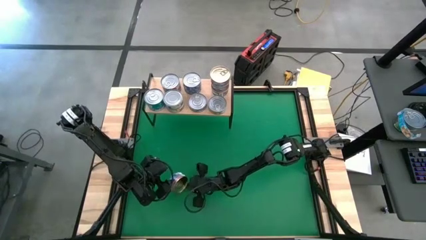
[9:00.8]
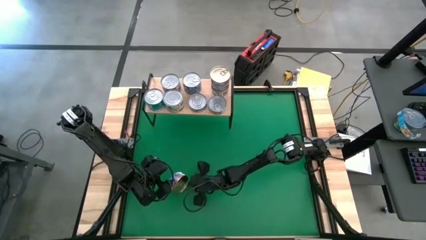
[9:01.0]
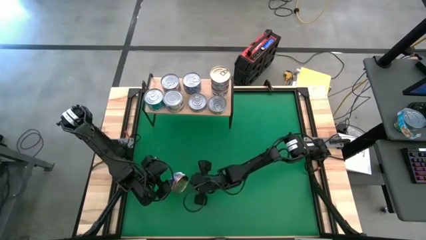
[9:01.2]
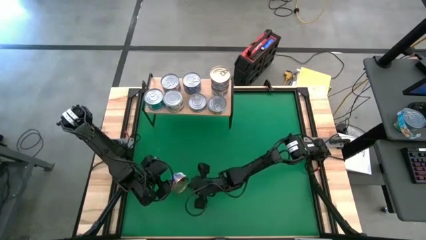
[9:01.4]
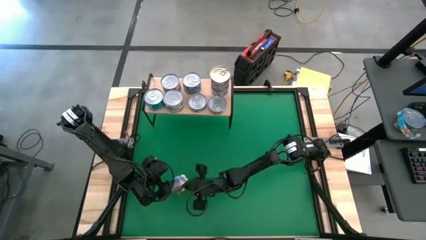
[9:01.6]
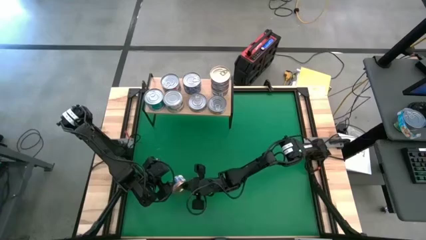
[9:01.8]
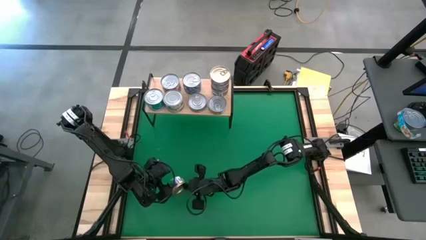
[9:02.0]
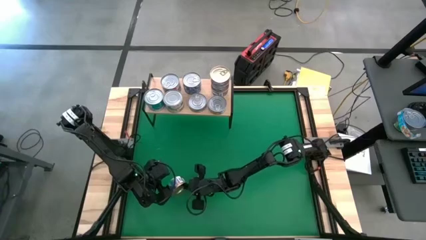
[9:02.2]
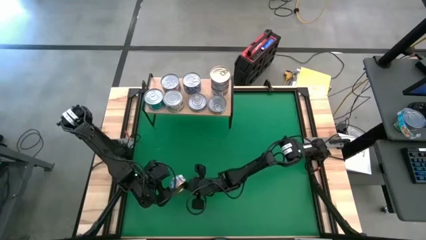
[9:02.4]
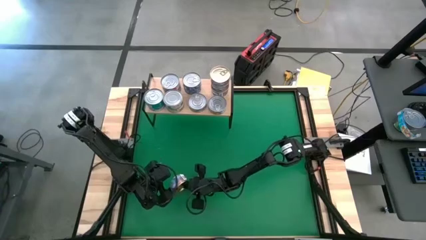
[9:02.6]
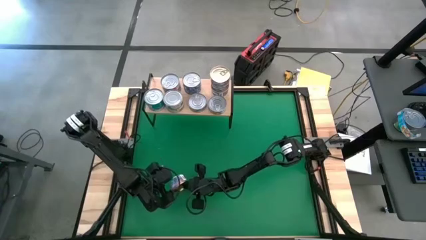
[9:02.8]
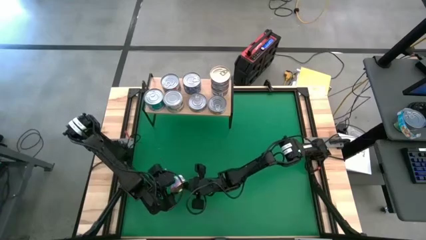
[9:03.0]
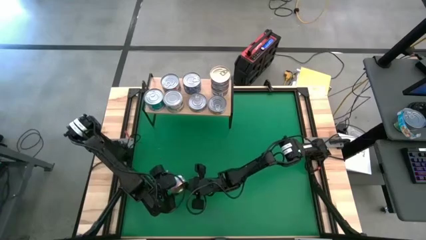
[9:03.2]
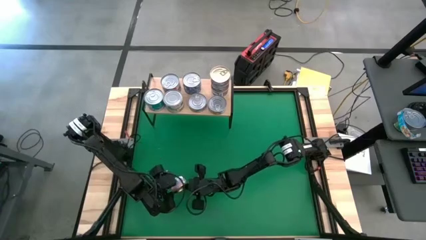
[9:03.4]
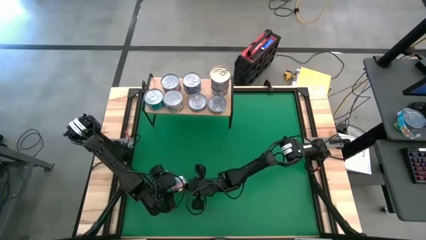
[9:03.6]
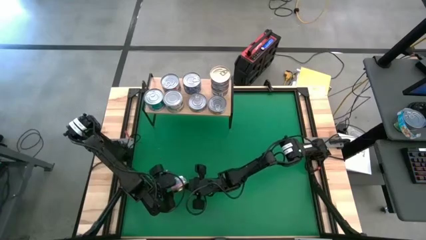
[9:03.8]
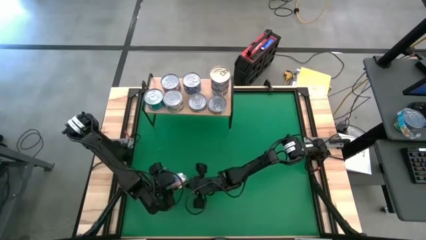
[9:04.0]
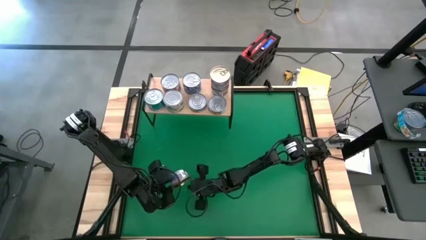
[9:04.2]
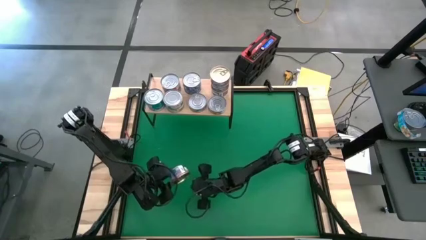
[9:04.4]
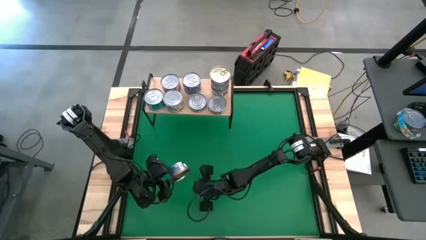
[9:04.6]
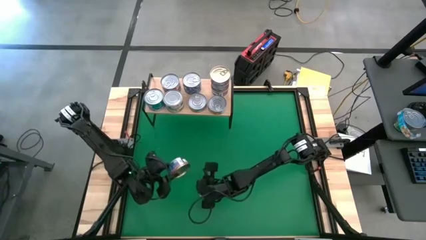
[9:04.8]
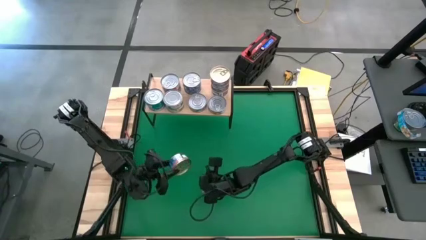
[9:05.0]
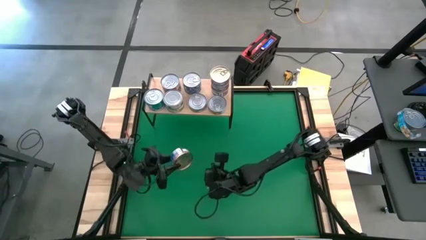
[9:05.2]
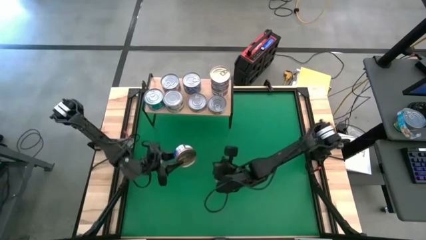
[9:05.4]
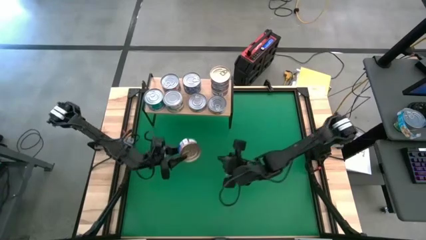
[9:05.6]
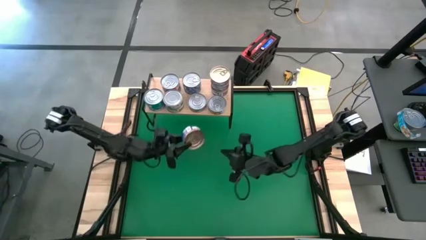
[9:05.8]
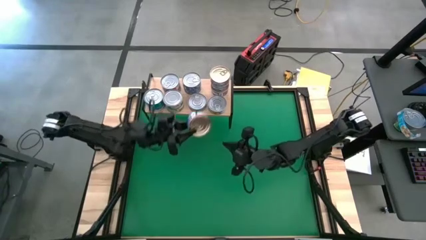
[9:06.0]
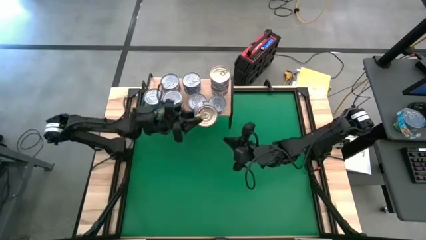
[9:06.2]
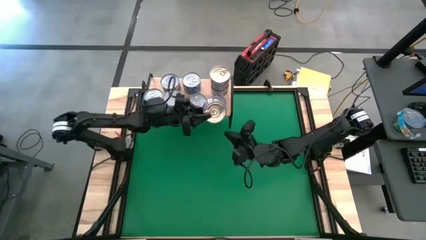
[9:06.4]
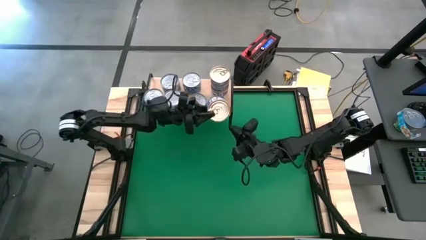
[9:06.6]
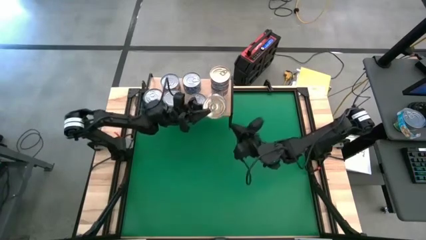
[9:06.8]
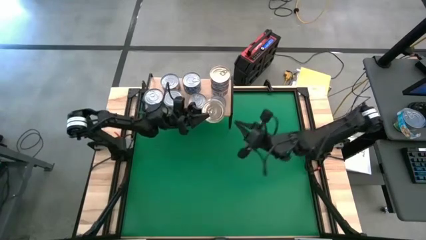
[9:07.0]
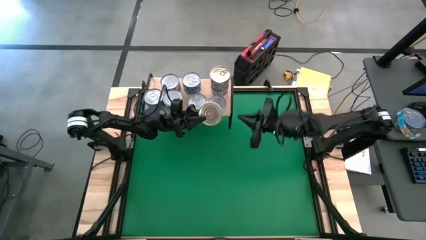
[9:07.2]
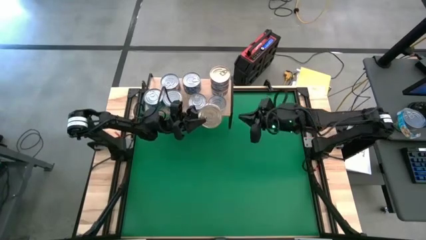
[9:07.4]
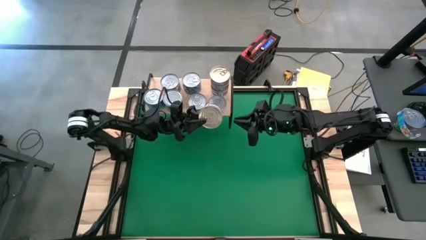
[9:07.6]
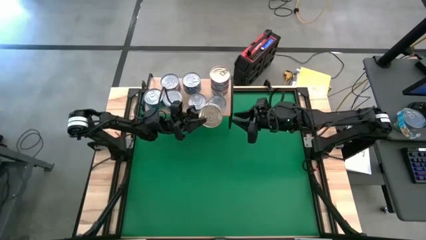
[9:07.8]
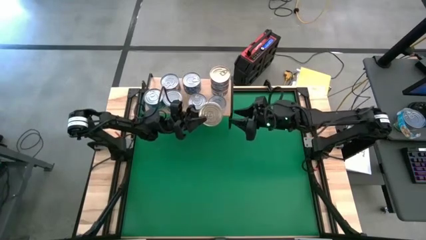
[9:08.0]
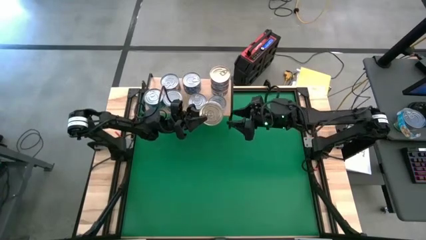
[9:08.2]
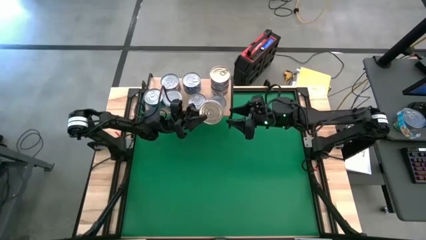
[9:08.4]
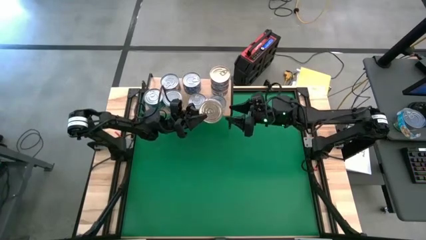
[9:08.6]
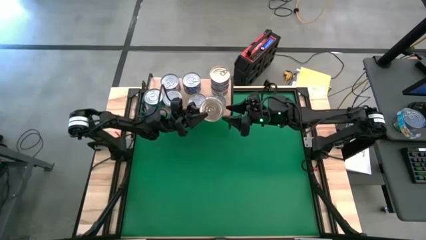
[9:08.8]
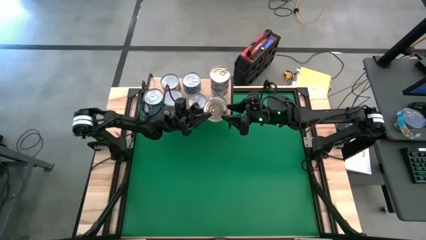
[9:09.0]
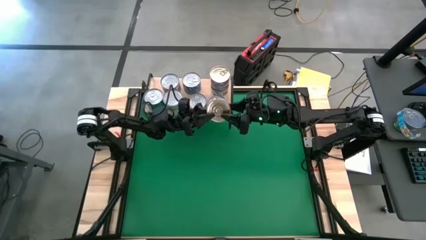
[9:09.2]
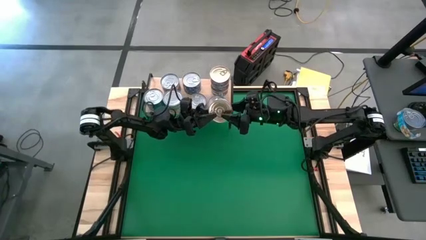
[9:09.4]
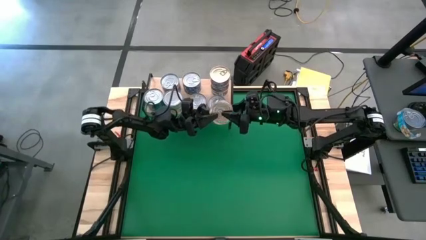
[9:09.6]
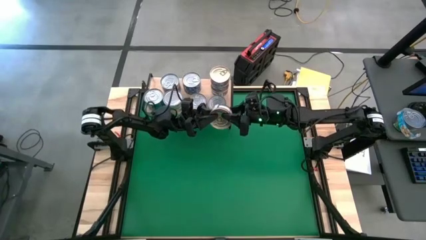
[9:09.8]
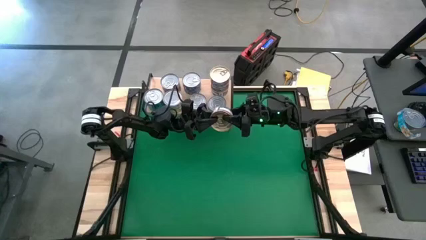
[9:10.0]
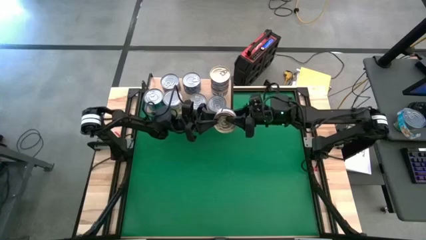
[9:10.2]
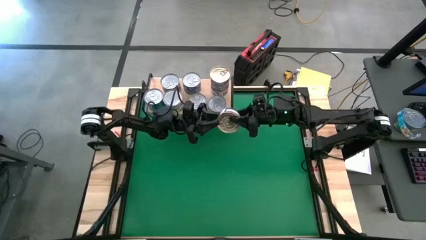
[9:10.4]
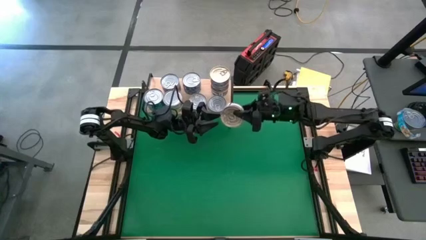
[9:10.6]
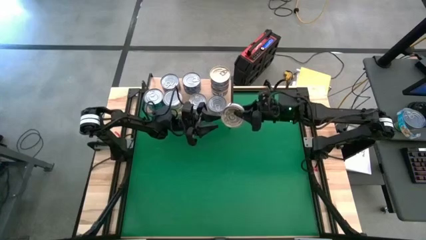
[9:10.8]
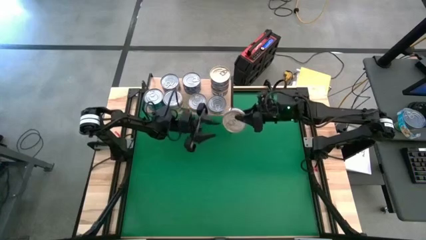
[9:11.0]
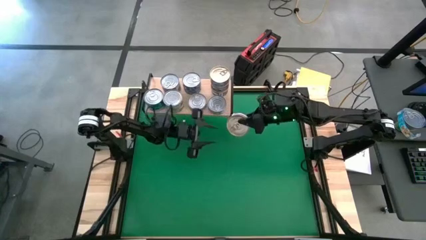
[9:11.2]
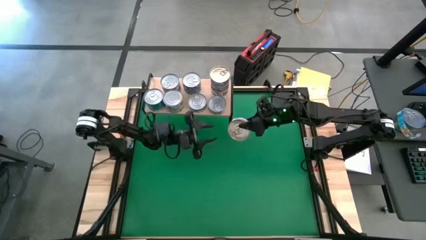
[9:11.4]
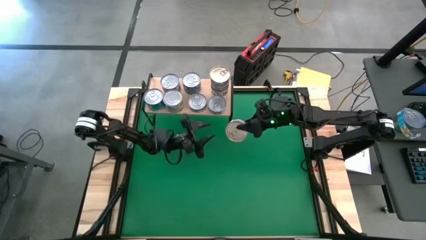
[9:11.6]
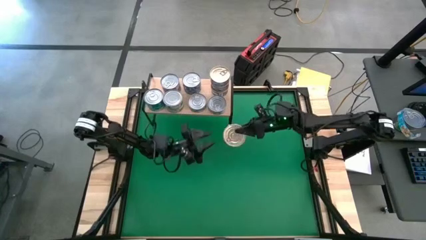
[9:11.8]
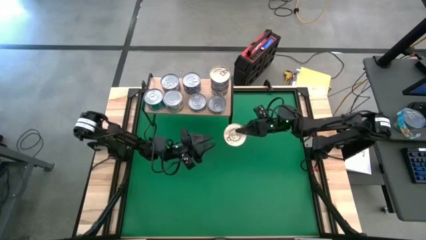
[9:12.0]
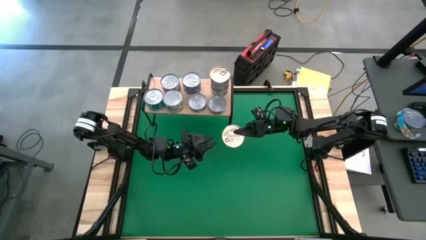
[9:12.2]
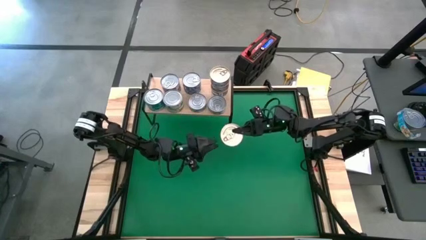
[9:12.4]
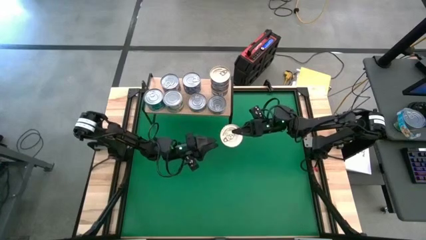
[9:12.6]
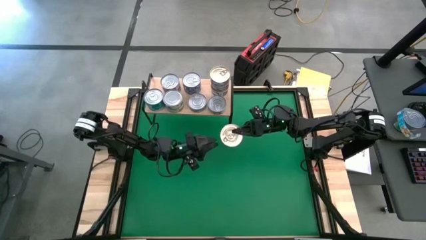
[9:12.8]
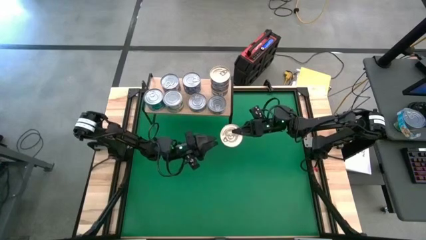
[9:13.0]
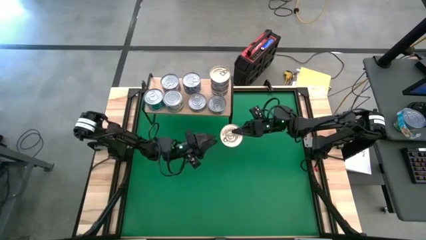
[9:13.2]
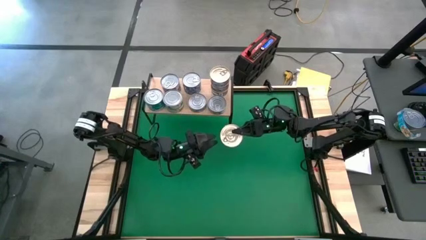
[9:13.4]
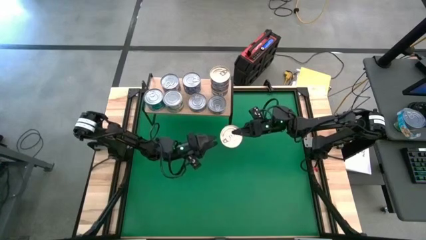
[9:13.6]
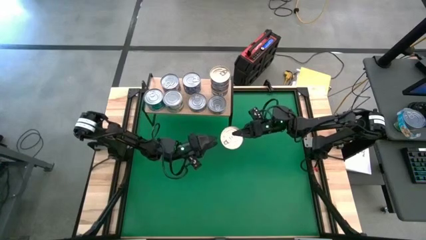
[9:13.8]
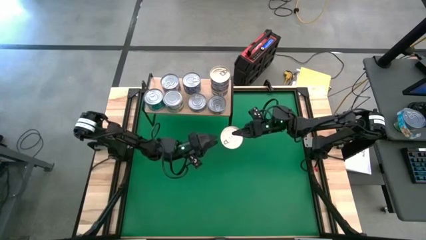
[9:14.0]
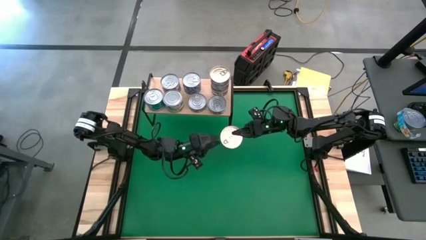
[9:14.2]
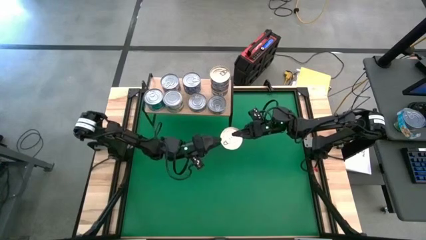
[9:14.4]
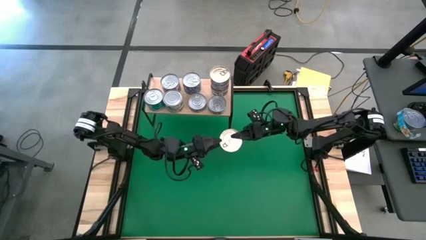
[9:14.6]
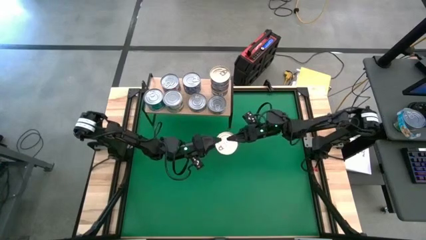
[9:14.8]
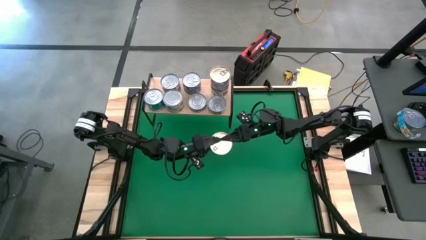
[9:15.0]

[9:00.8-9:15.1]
Task: Stack canned seafood by type on shelf
Stack the blue tuna can on top of the blue tuna can on the shelf
